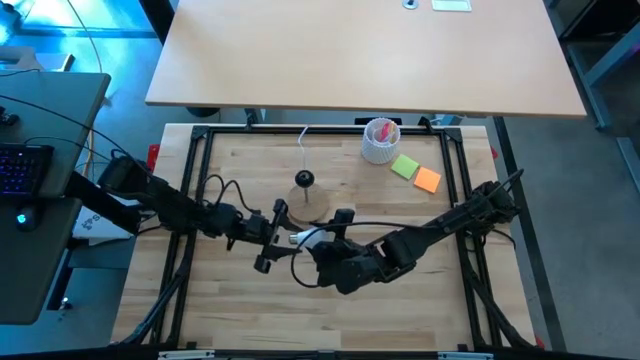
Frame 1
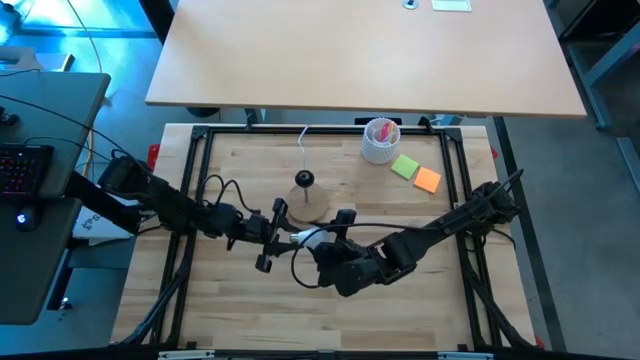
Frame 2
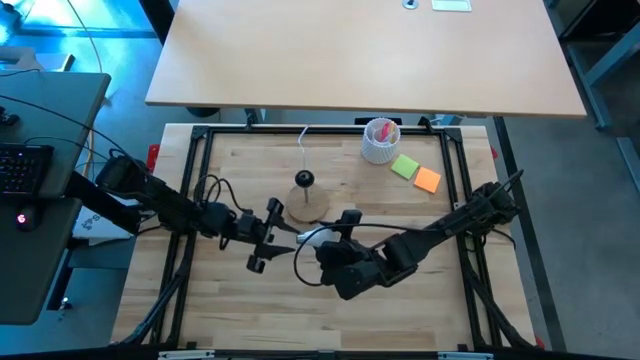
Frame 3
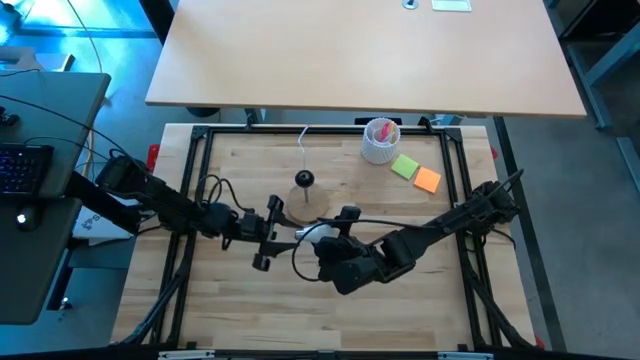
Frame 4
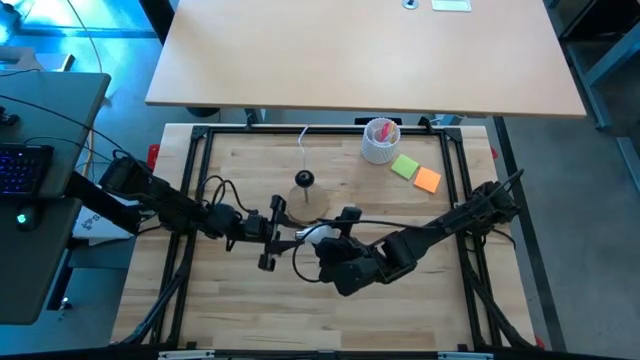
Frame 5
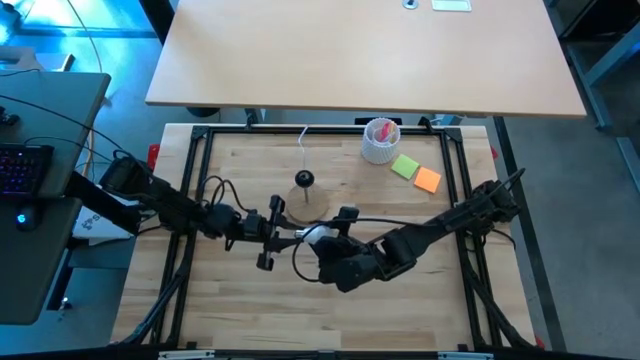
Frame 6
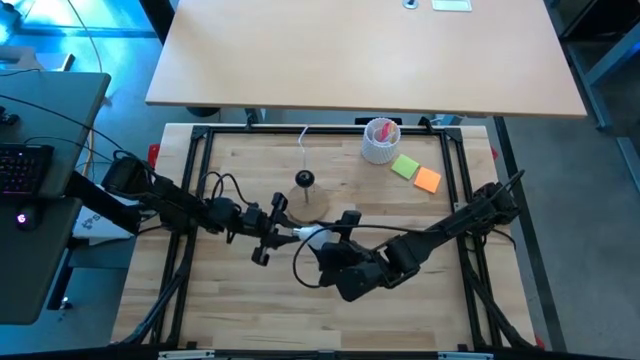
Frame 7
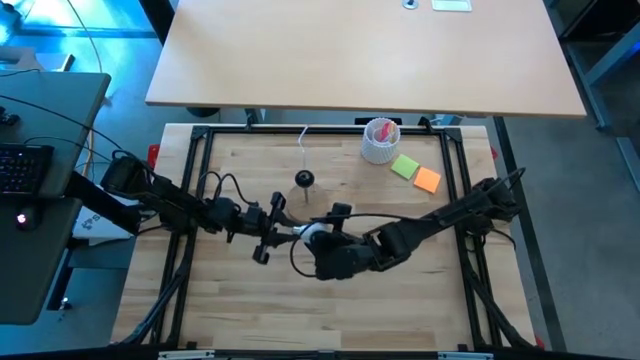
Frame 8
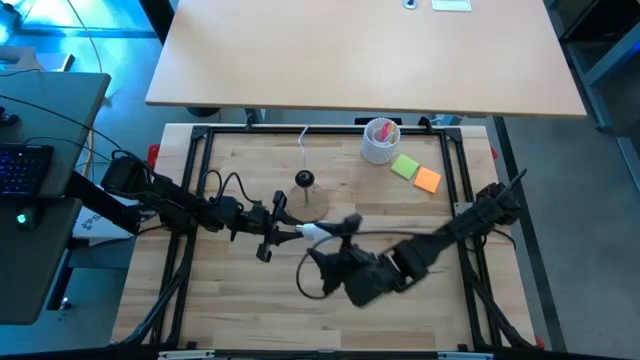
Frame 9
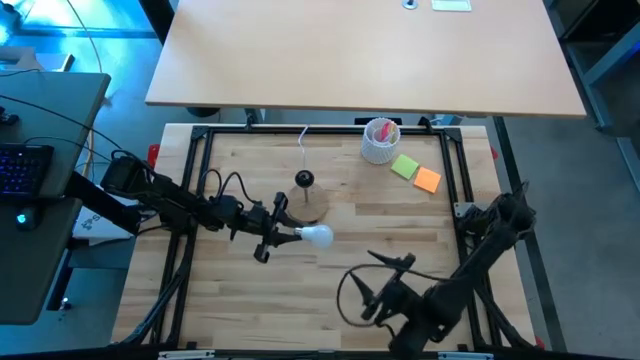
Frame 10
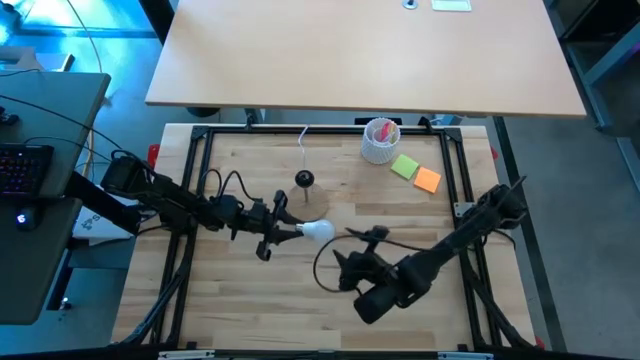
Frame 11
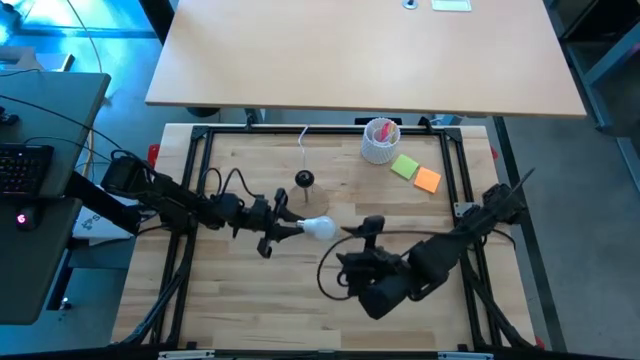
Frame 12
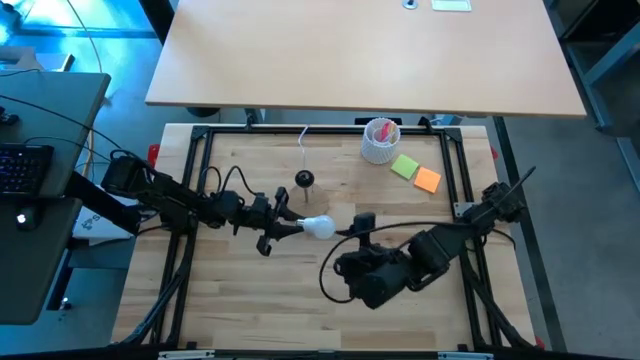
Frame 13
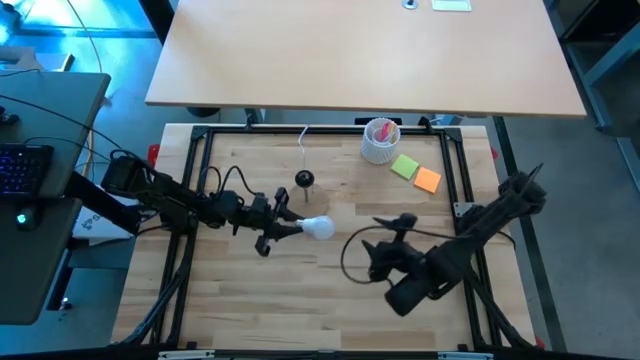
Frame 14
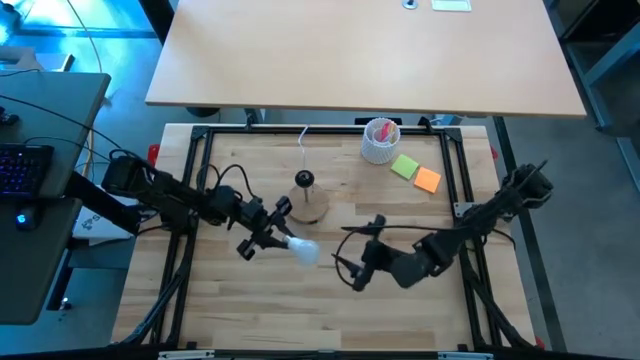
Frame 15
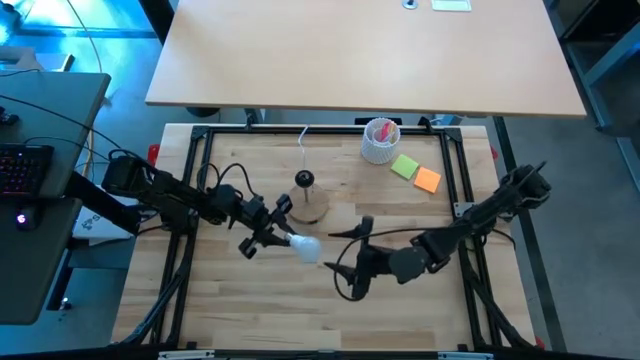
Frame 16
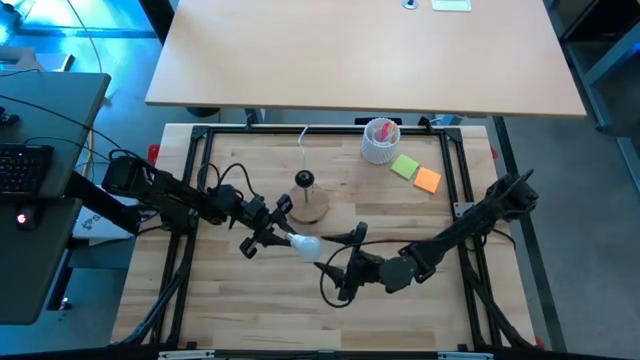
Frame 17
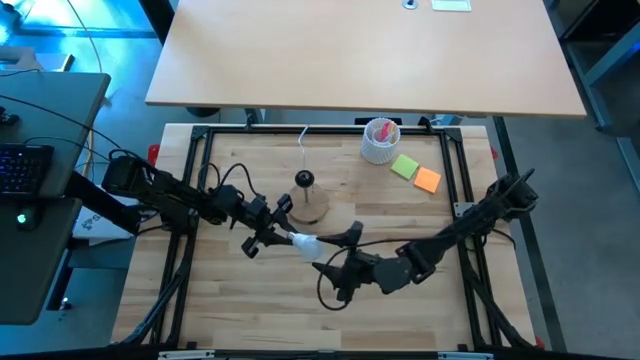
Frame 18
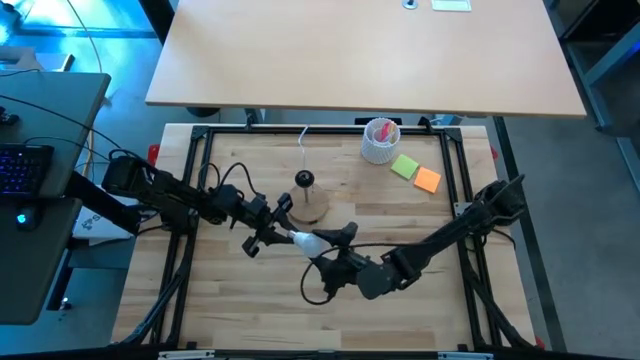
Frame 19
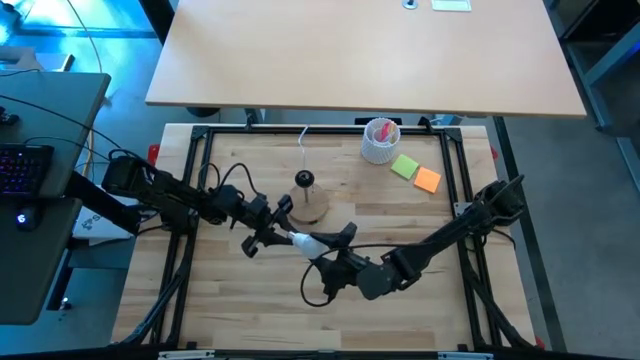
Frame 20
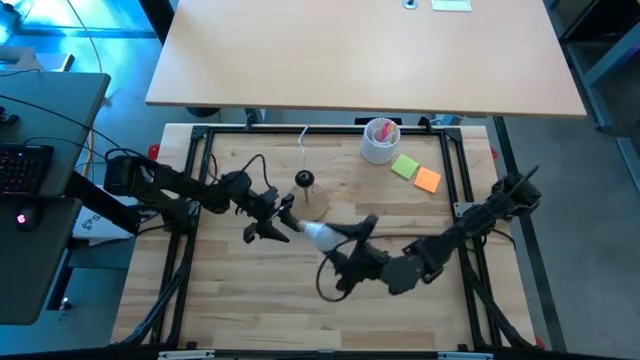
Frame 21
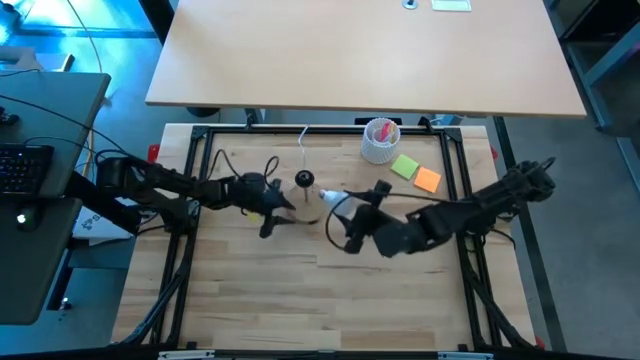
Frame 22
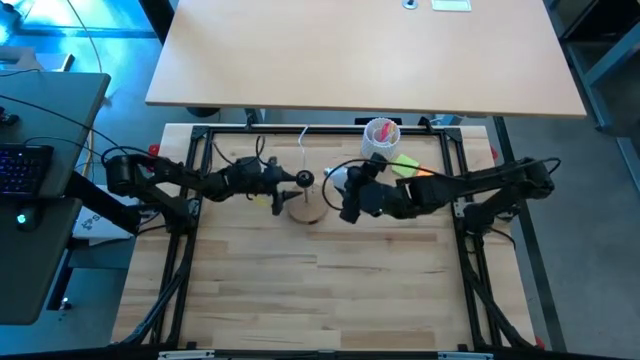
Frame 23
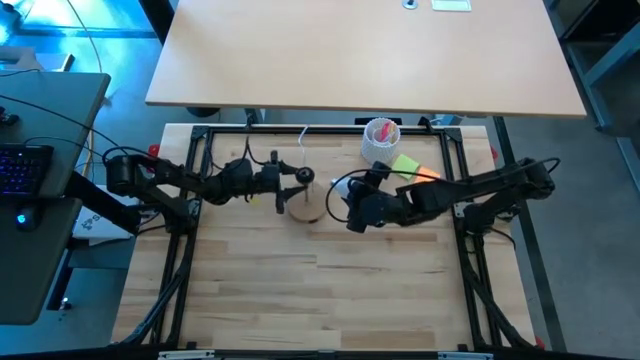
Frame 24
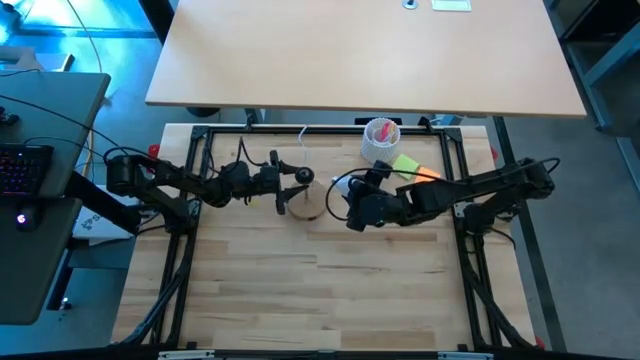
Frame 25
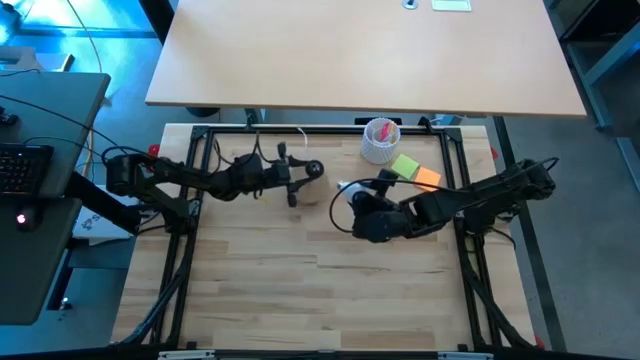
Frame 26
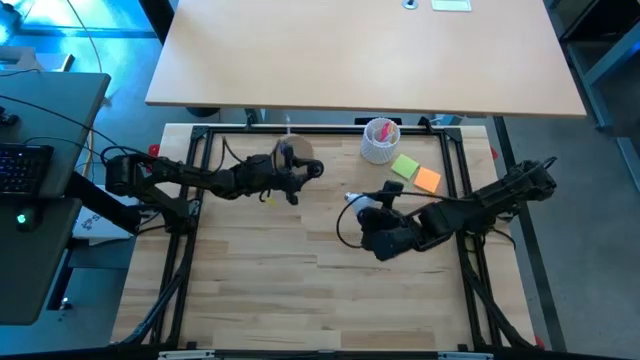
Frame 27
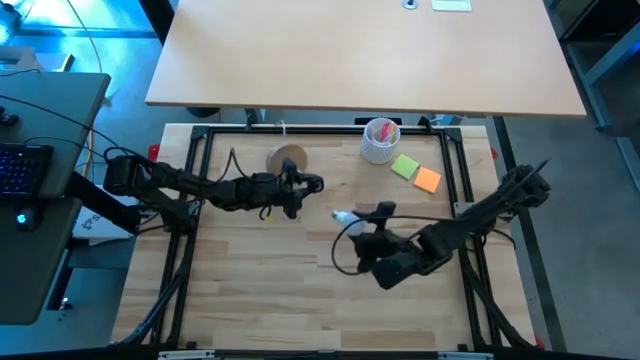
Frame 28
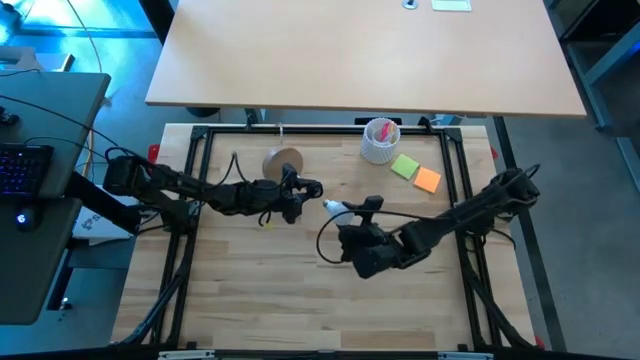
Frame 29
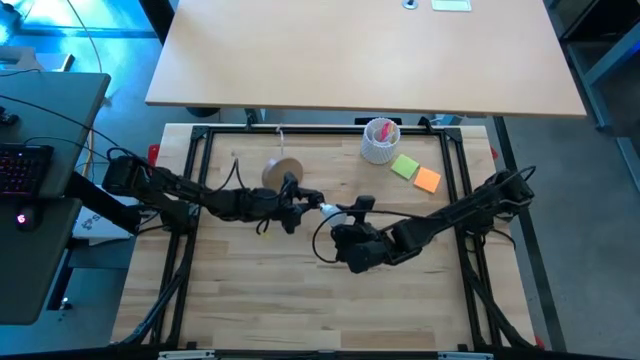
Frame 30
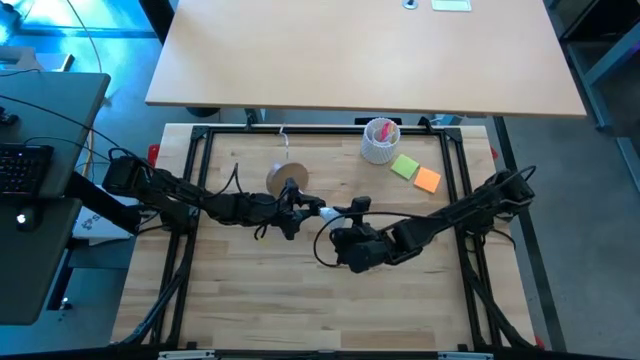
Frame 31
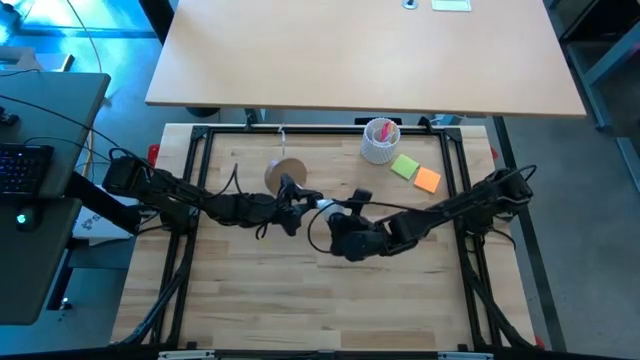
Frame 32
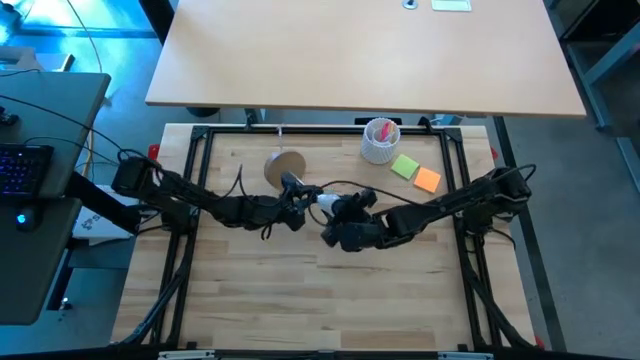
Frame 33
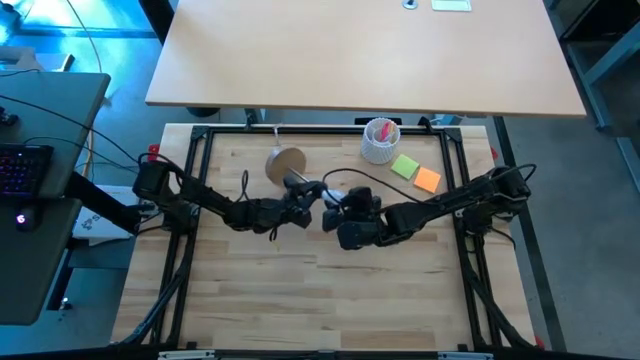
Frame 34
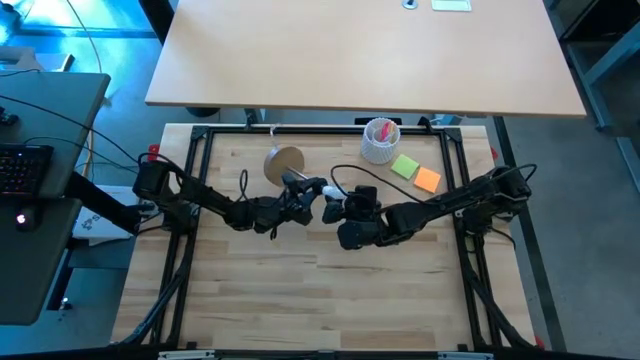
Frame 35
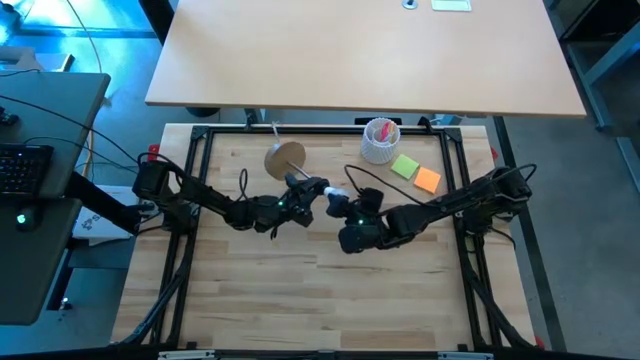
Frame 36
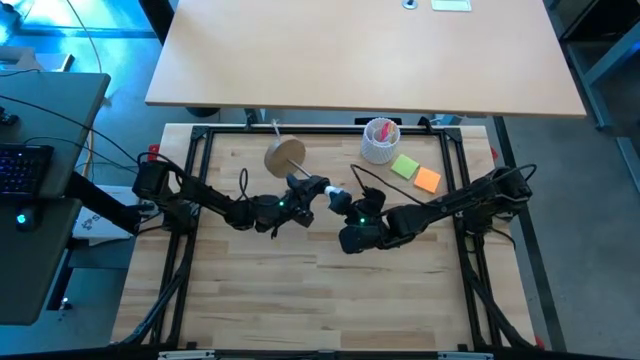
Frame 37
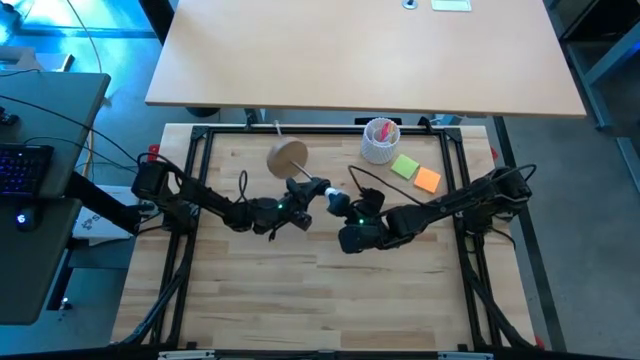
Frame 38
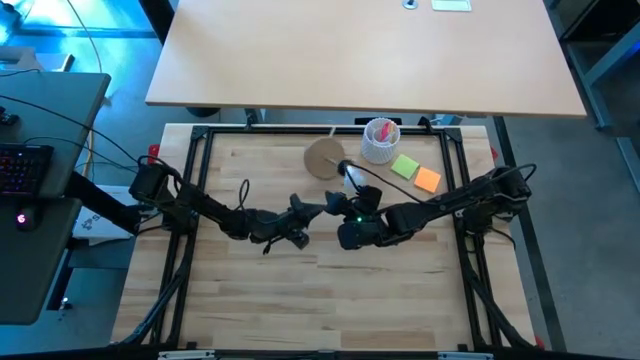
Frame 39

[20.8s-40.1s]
Task: Screw lightbulb
Insert the light bulb into the lamp

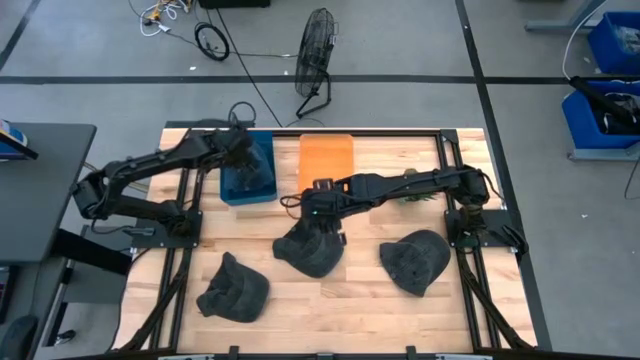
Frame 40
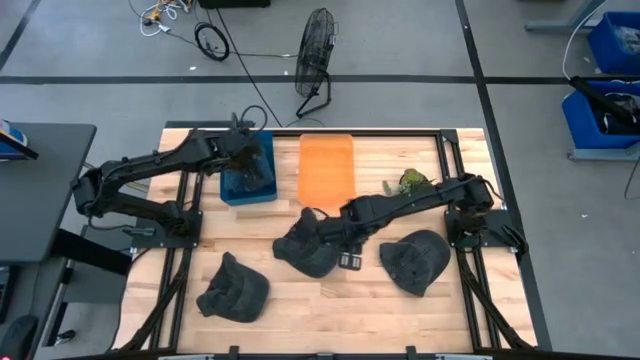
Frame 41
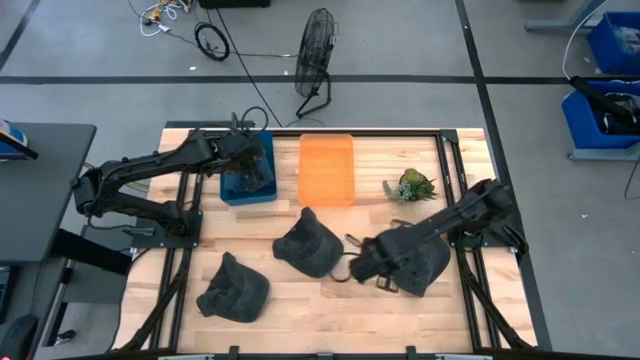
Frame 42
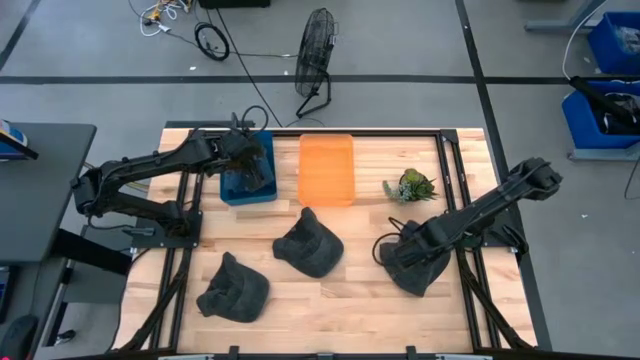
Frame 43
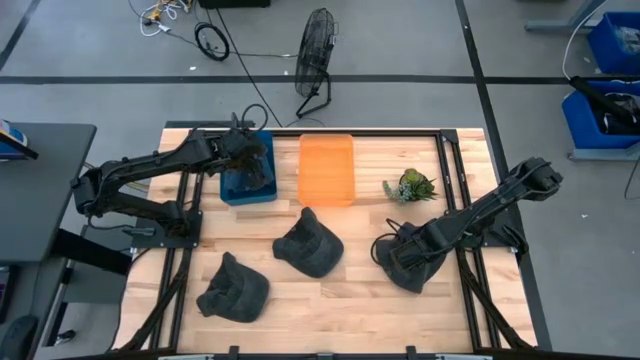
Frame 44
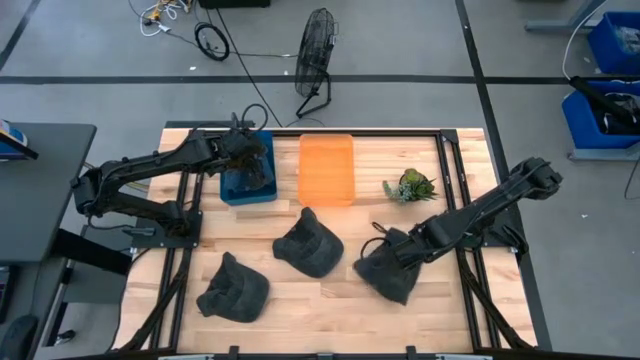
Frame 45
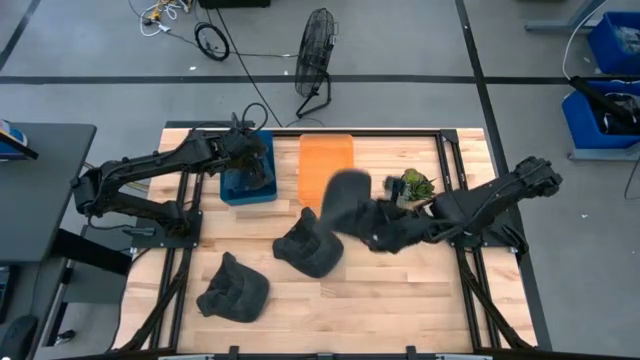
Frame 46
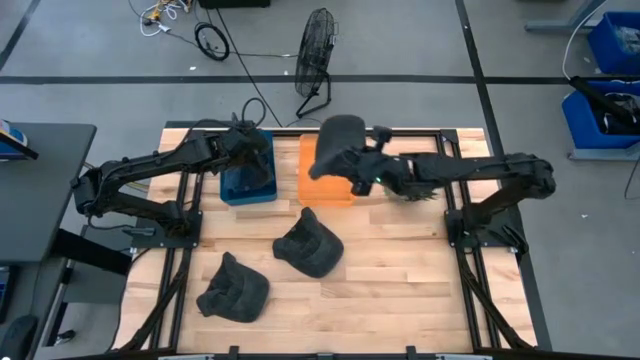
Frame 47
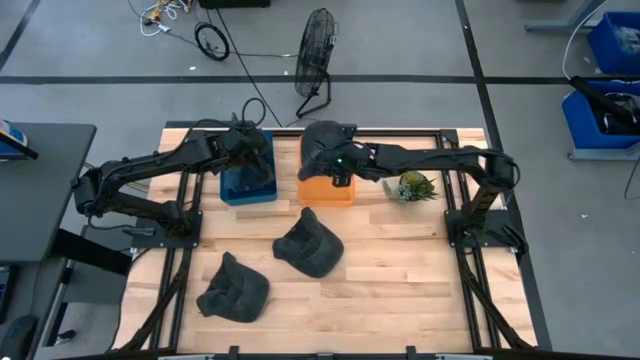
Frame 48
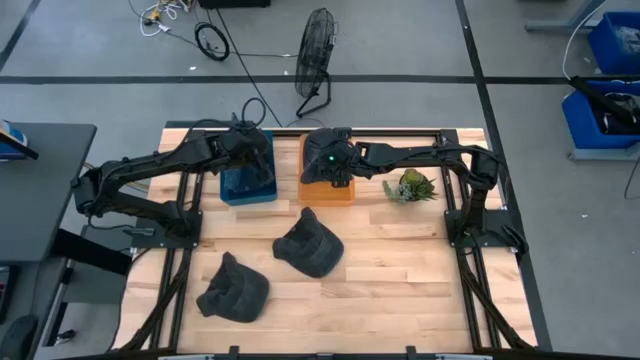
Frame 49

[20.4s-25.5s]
Task: Pick & Place hat
Put the right black cap into the orange bin
